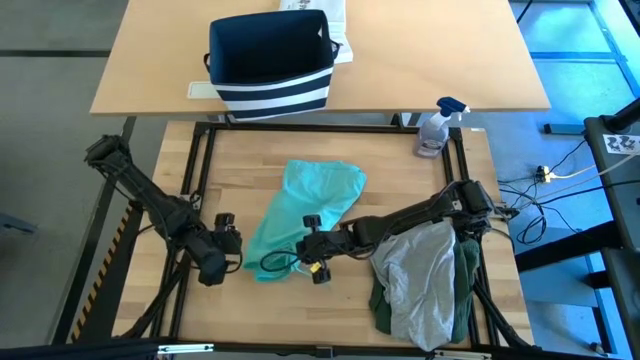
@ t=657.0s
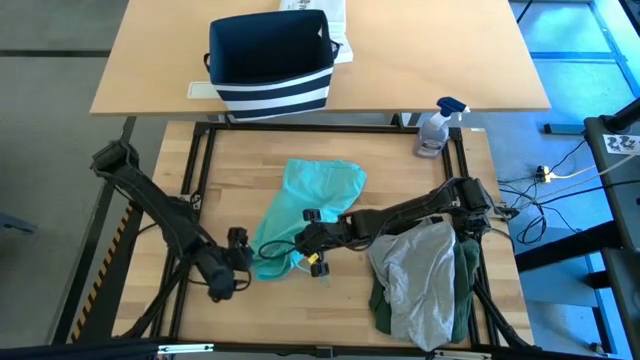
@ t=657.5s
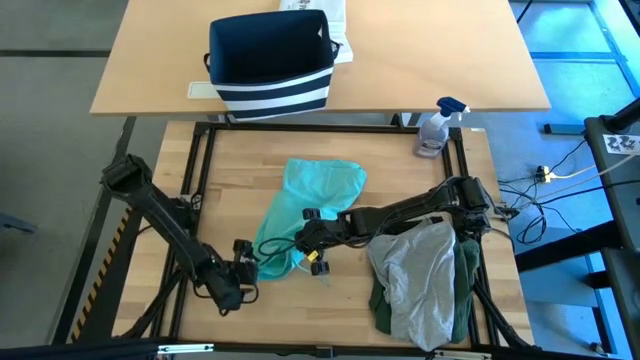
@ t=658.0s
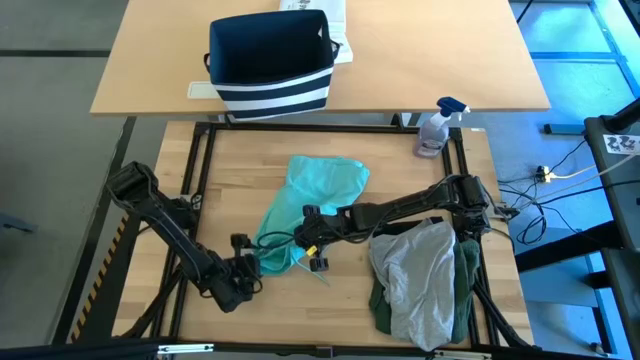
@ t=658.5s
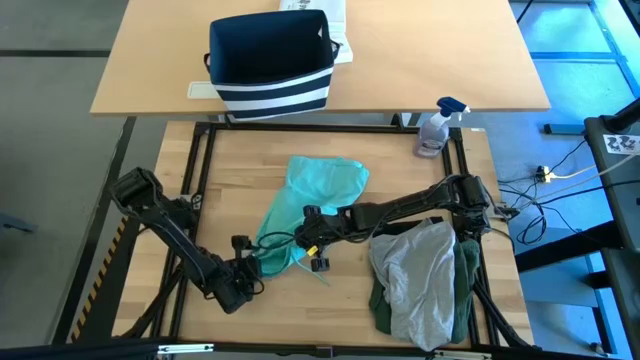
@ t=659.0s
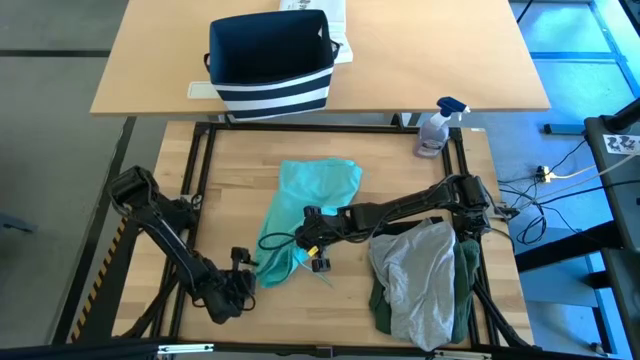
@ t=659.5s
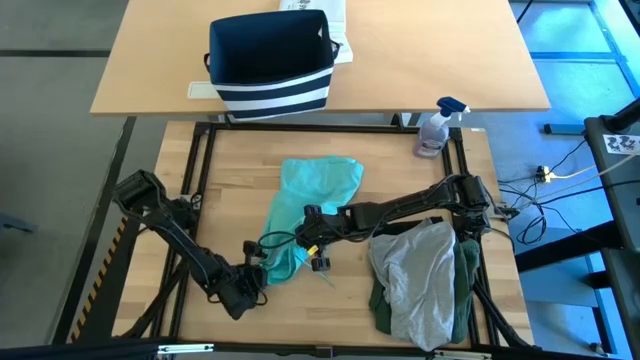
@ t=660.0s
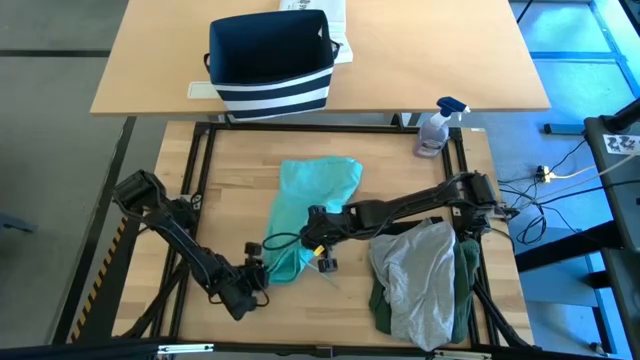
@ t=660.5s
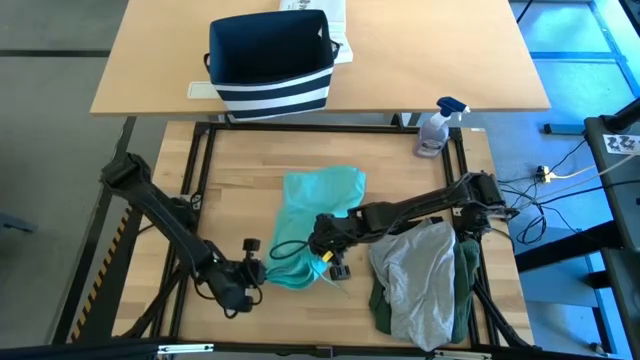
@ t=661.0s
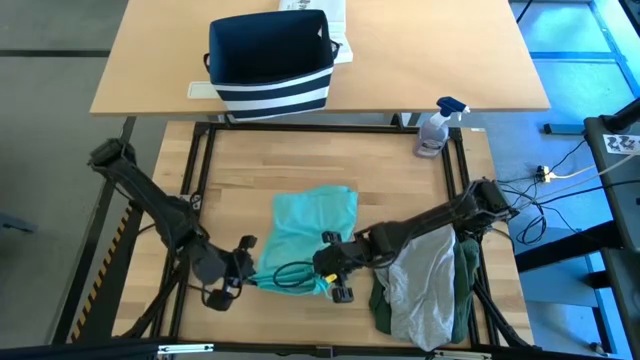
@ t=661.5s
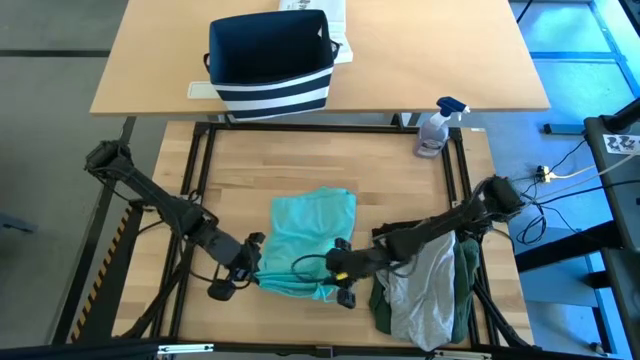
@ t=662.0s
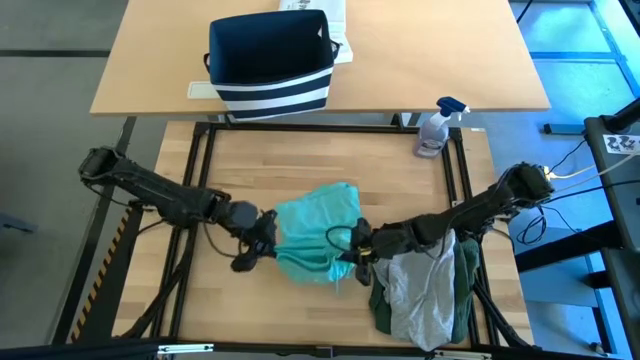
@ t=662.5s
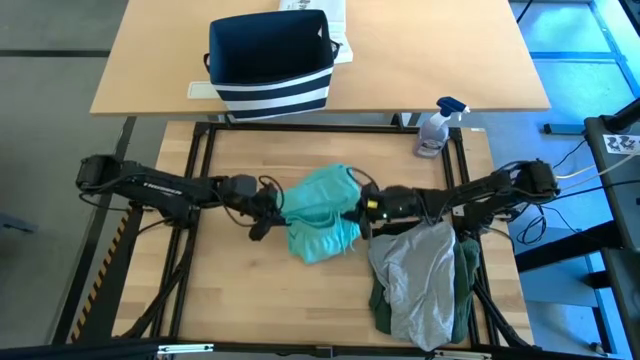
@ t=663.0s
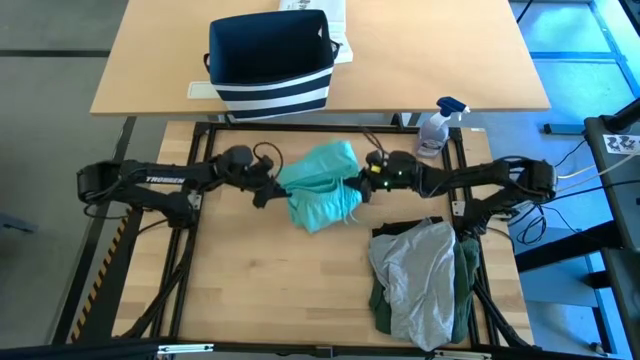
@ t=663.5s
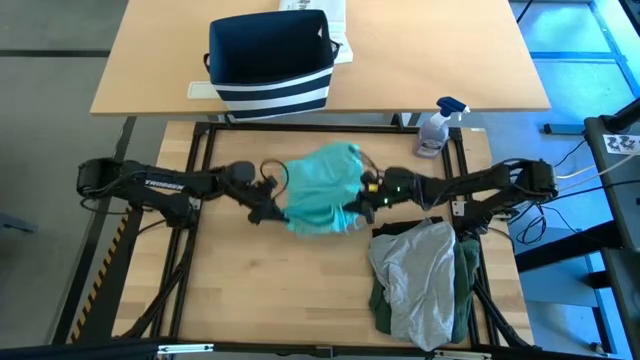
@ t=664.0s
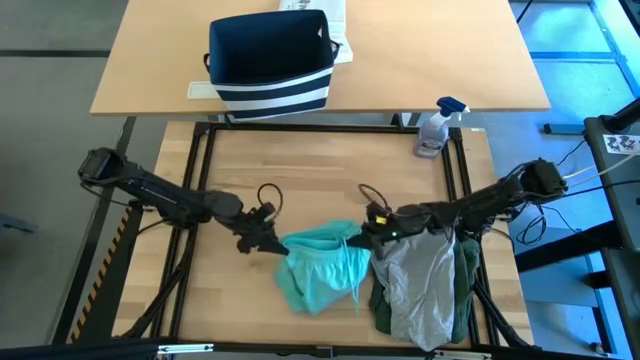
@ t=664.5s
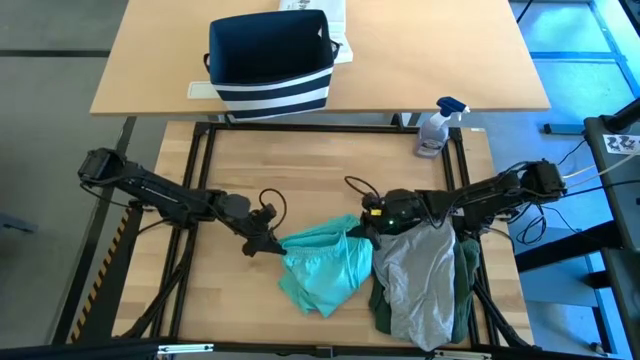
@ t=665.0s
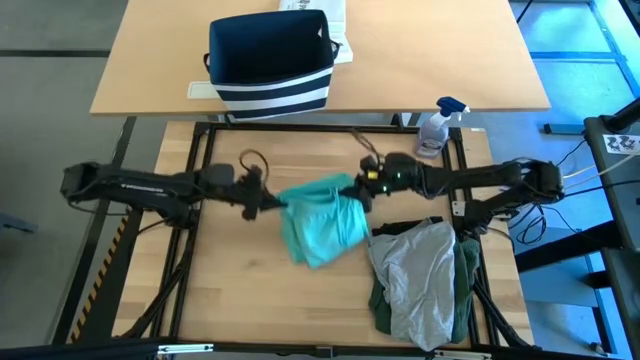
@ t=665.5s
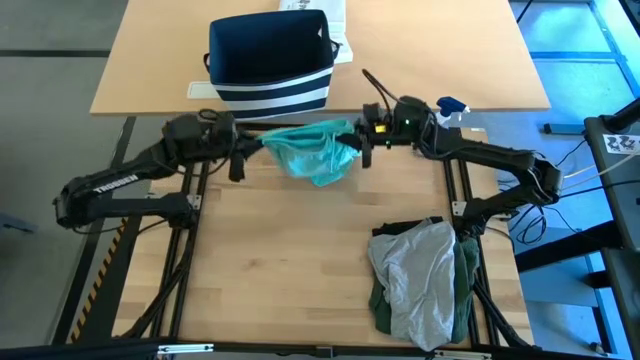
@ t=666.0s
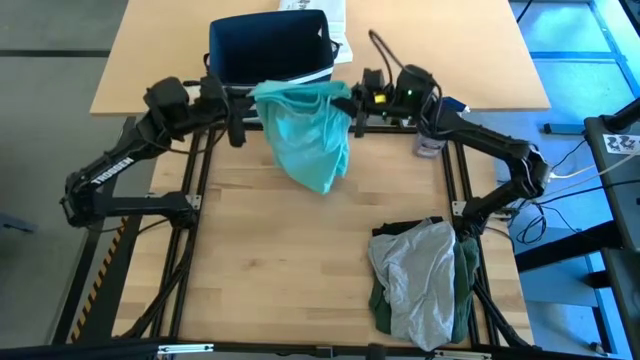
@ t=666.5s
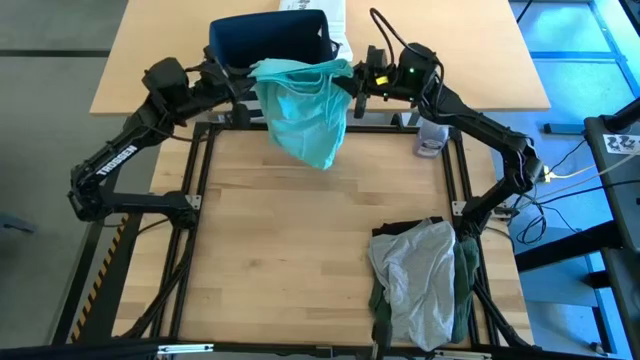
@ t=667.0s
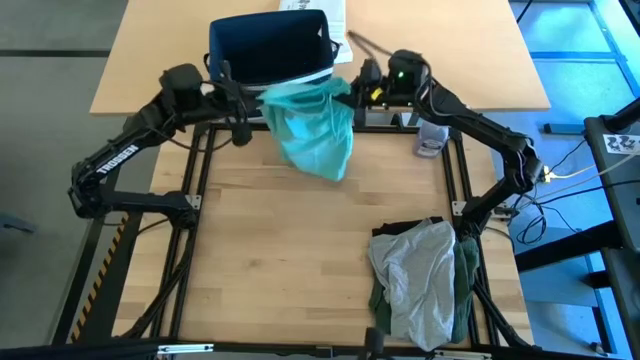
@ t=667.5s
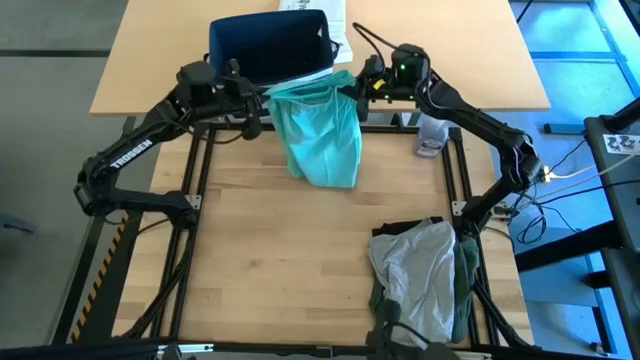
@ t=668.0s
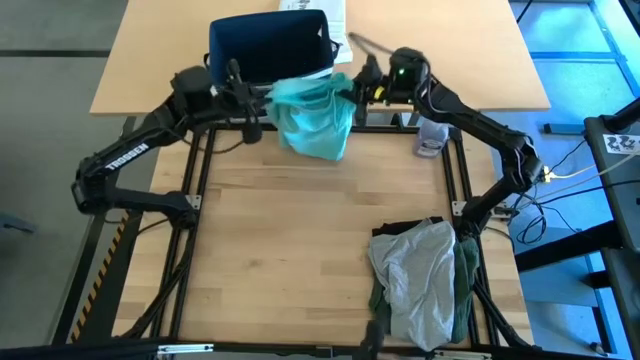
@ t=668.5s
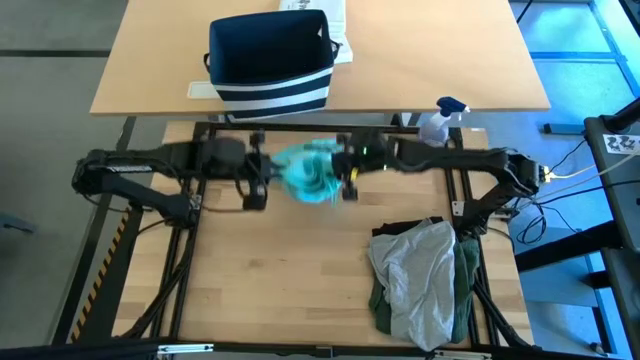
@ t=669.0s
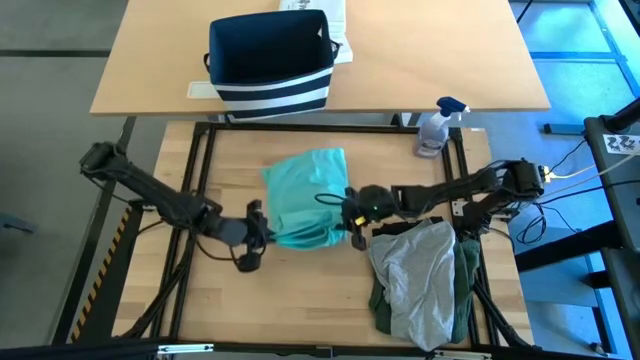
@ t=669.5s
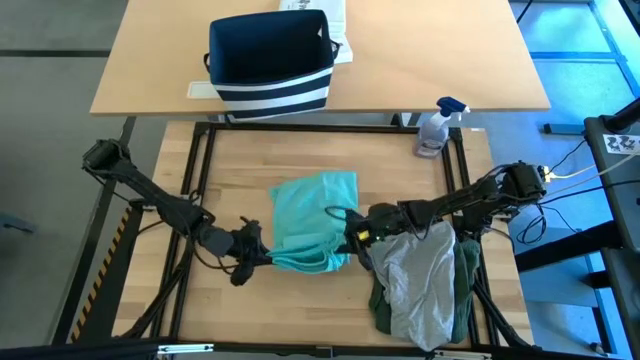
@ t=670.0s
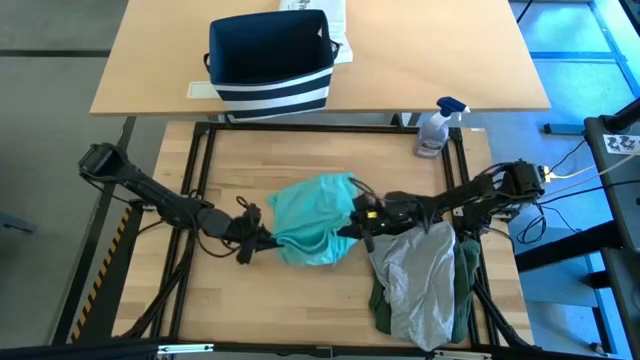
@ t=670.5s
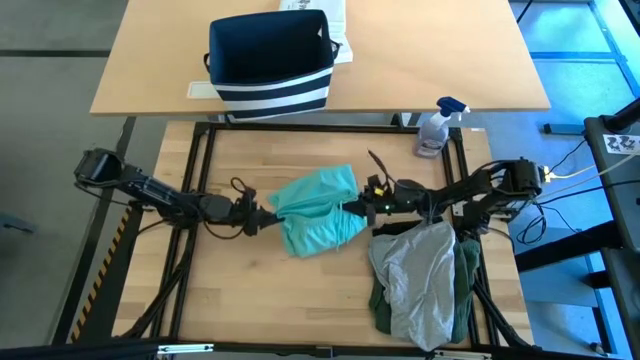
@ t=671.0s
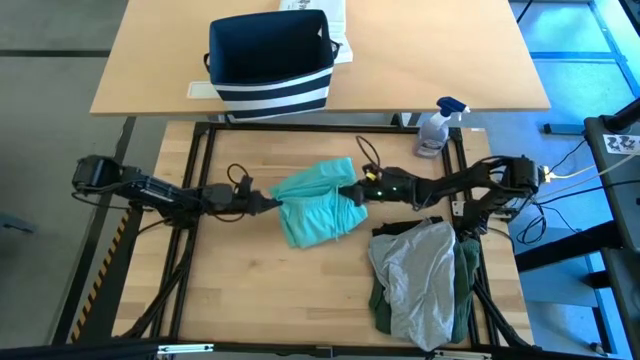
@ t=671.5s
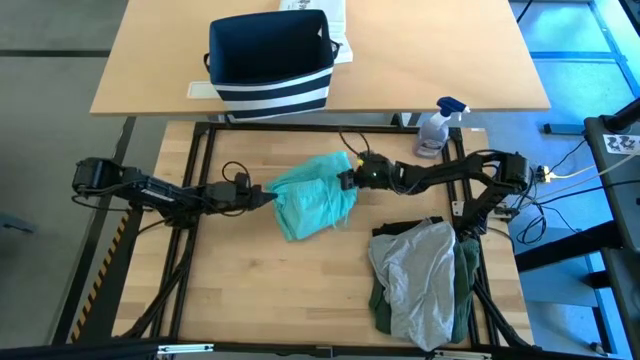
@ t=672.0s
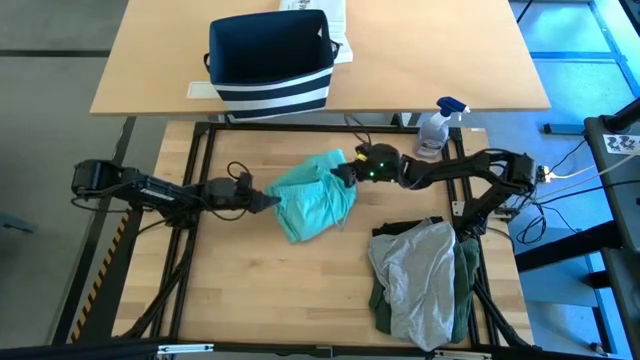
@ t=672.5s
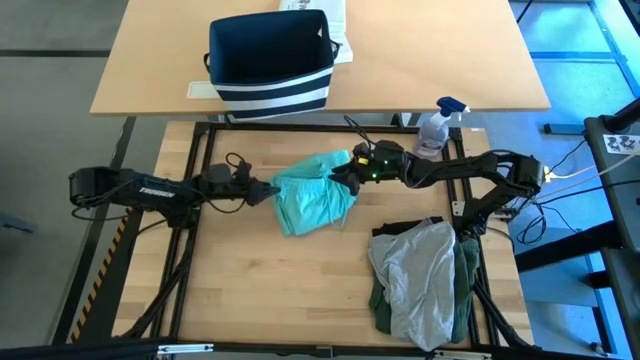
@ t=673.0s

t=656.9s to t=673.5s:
Task: Fold Laundry from Bin
Fold the blue shorts

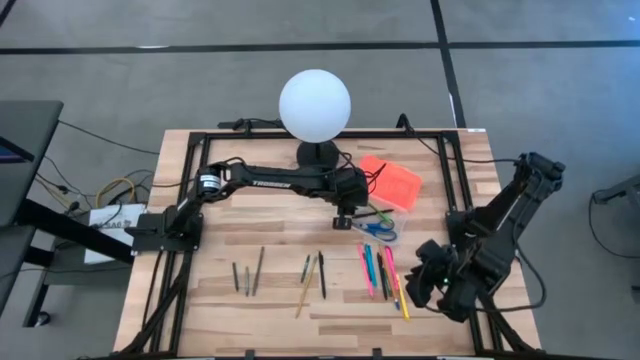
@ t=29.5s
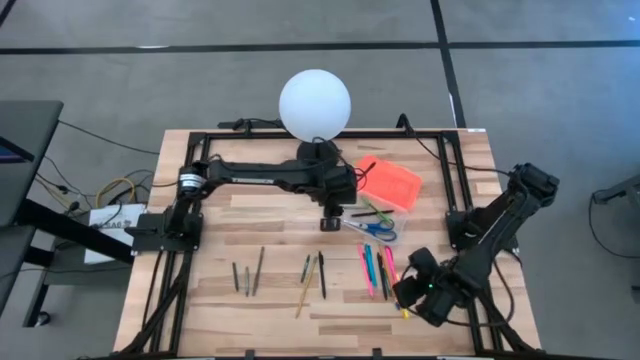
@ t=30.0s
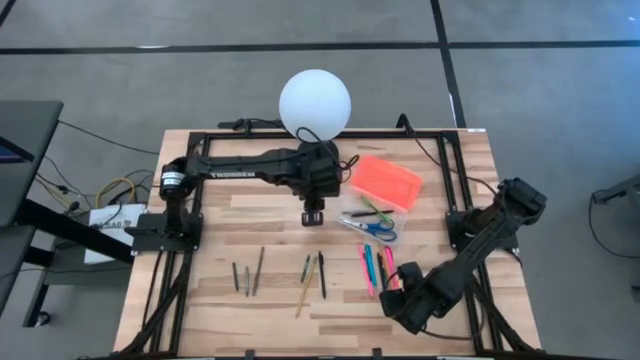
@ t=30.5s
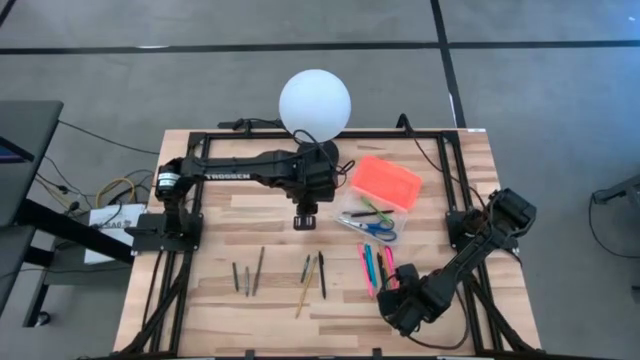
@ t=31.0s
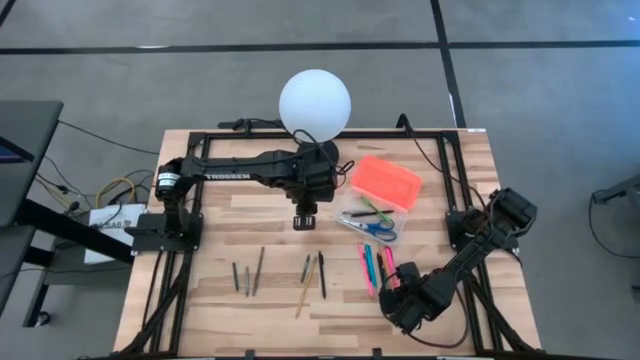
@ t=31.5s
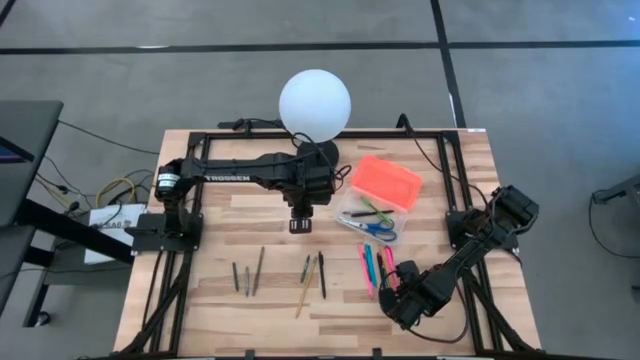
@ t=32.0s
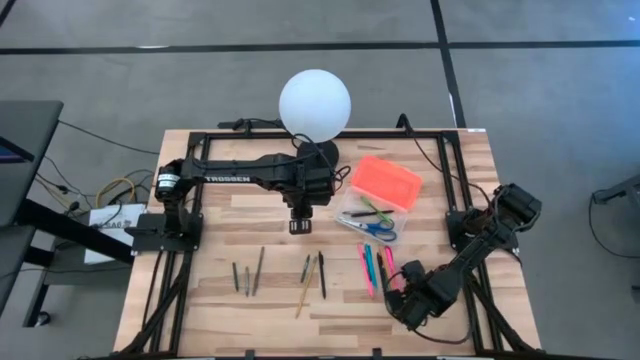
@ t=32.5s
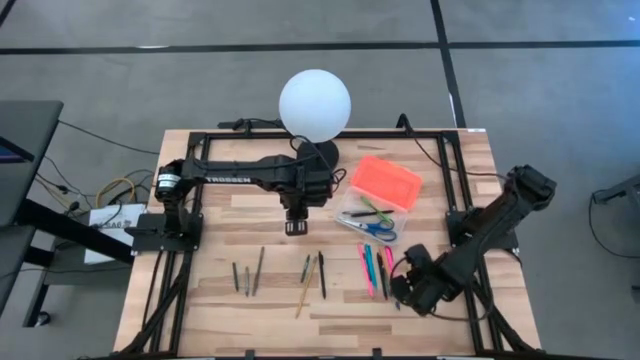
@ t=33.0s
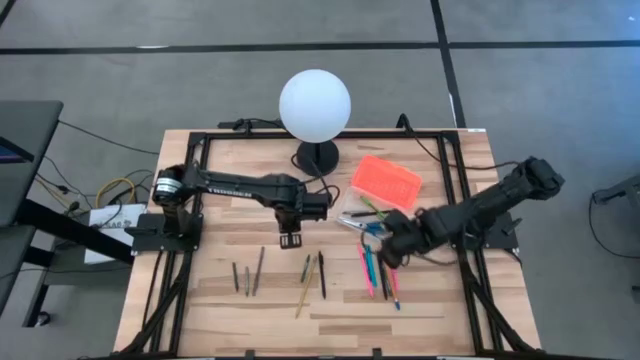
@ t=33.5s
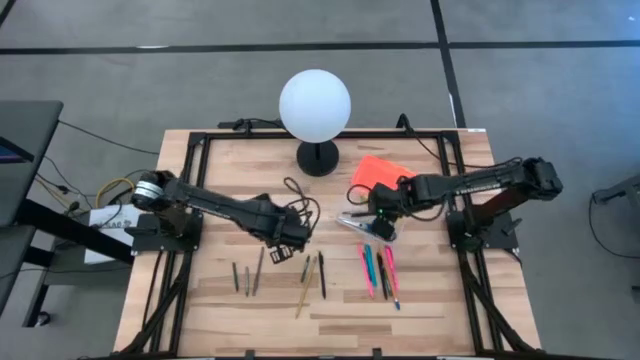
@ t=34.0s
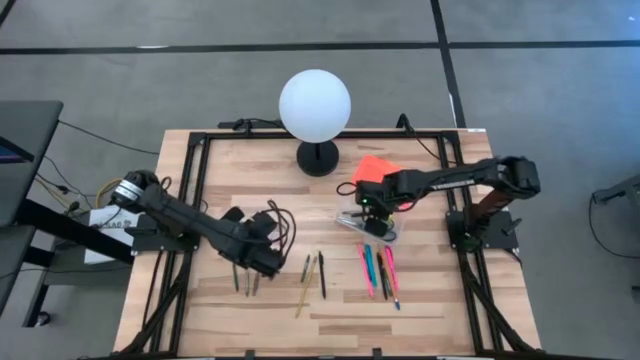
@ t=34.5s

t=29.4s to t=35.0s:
Task: Pick & place school supplies into a supply box
Put the yellow pen into the orange supply box
